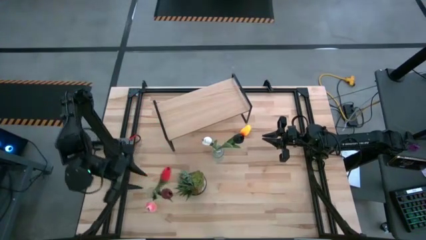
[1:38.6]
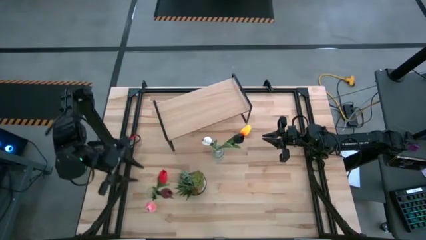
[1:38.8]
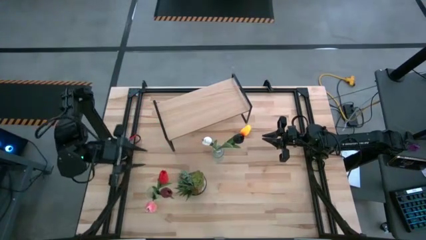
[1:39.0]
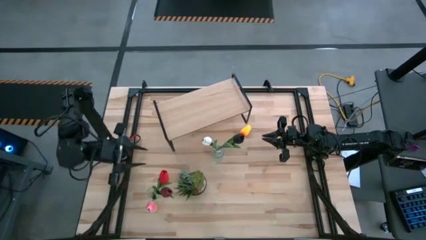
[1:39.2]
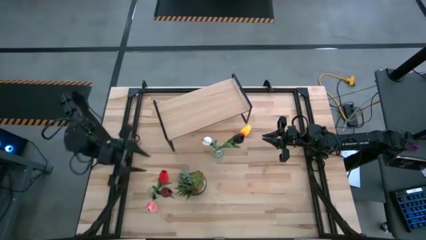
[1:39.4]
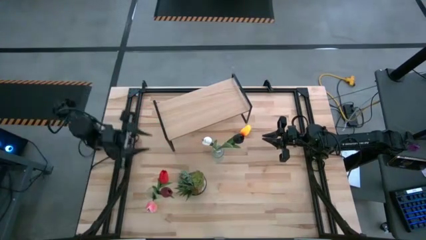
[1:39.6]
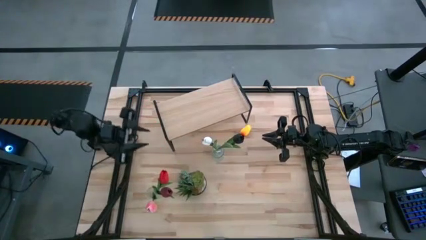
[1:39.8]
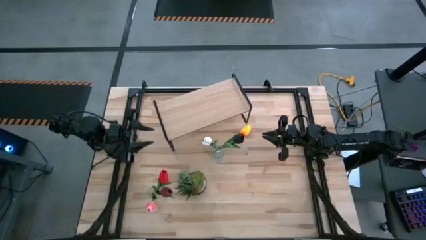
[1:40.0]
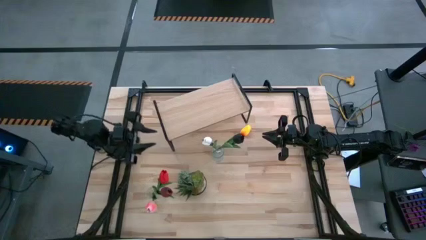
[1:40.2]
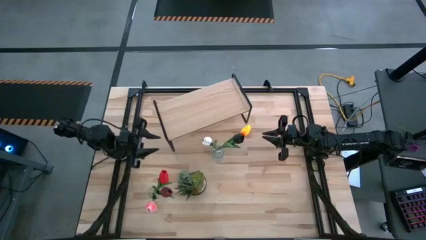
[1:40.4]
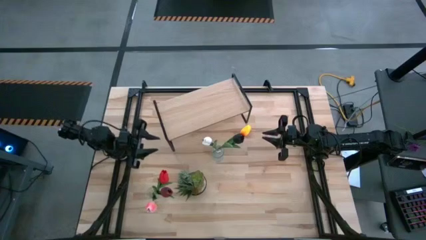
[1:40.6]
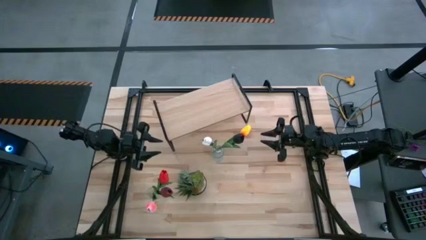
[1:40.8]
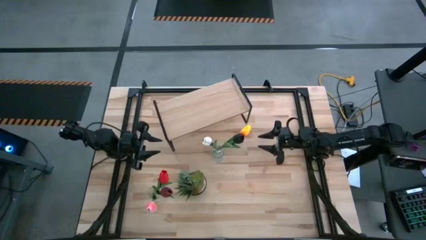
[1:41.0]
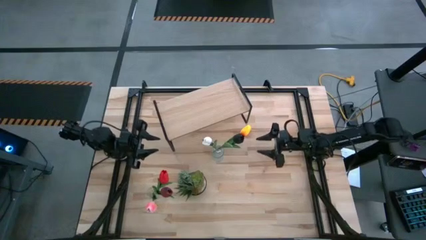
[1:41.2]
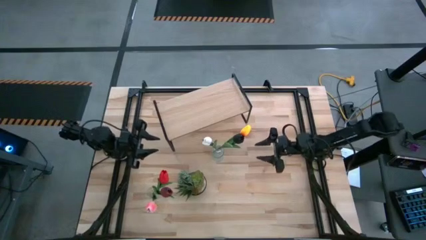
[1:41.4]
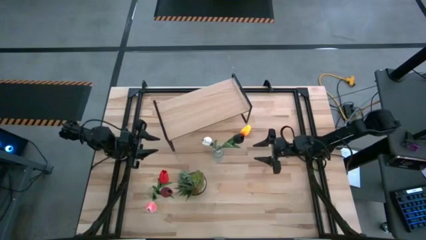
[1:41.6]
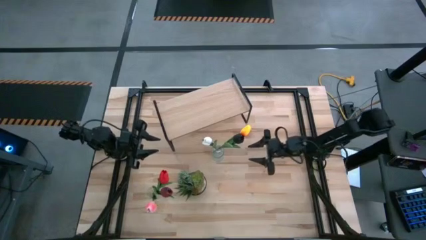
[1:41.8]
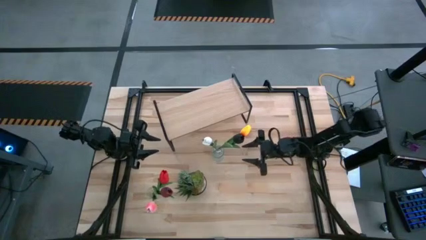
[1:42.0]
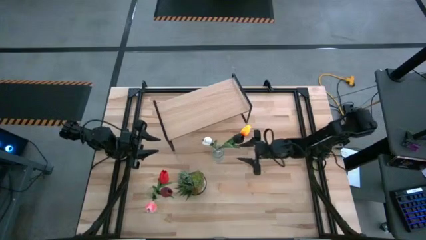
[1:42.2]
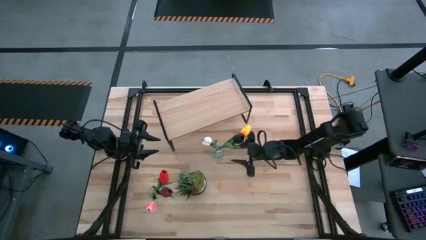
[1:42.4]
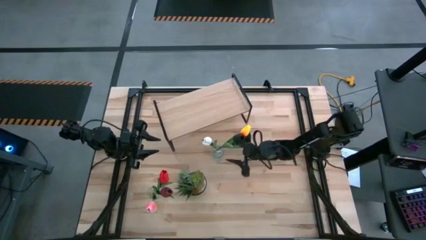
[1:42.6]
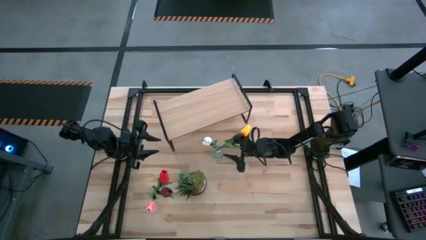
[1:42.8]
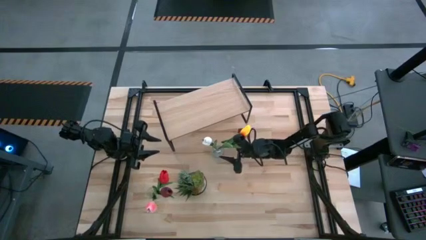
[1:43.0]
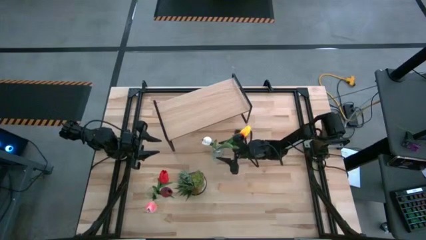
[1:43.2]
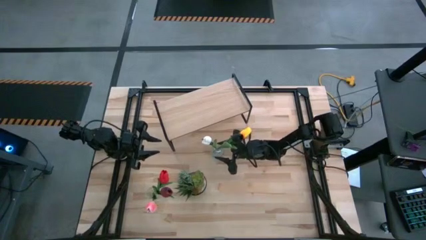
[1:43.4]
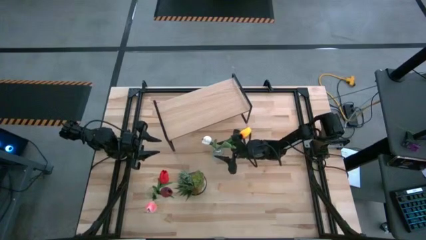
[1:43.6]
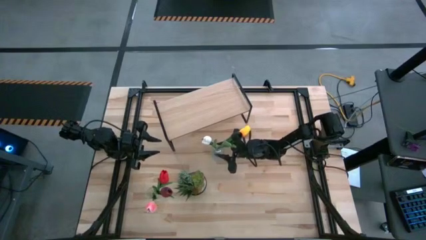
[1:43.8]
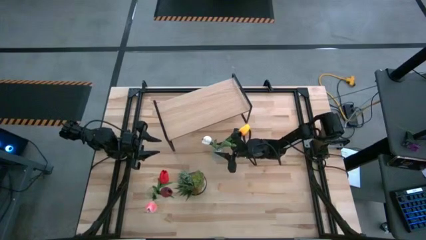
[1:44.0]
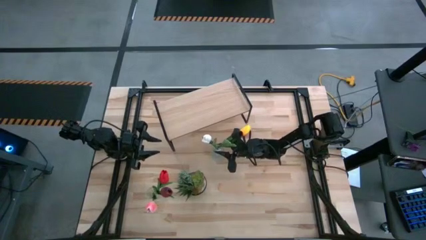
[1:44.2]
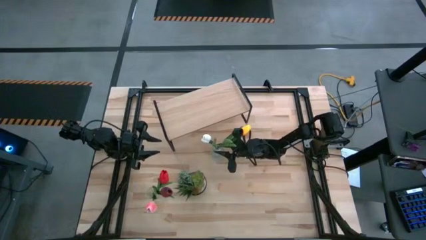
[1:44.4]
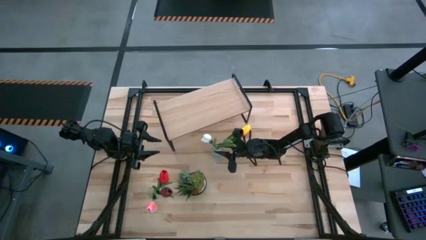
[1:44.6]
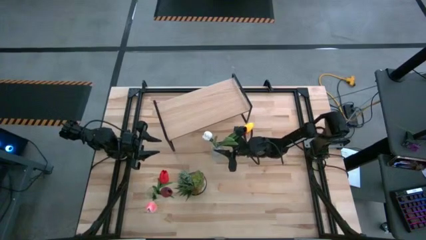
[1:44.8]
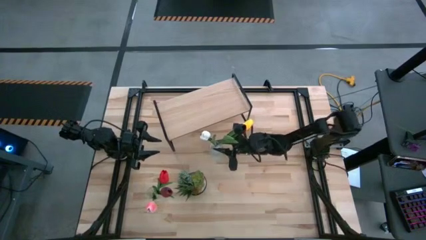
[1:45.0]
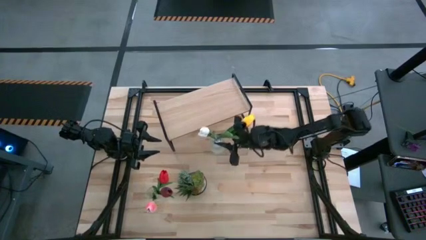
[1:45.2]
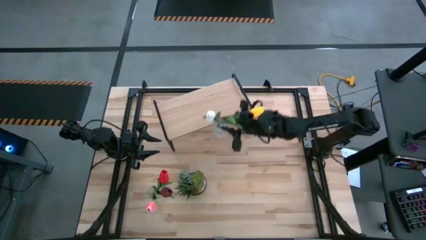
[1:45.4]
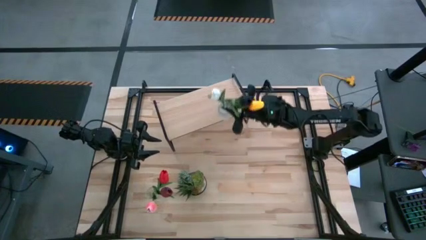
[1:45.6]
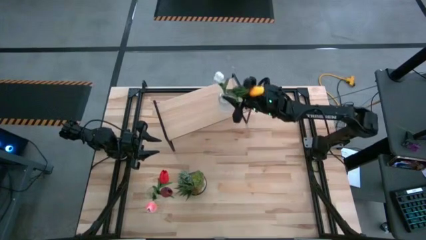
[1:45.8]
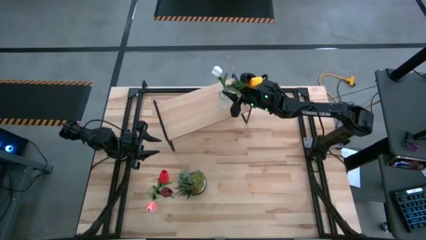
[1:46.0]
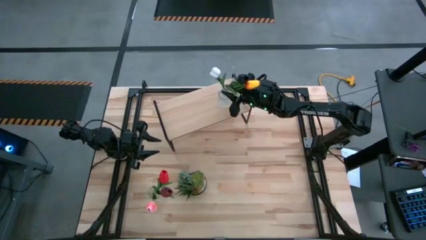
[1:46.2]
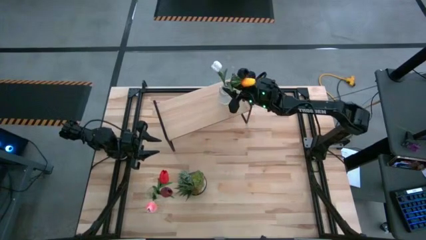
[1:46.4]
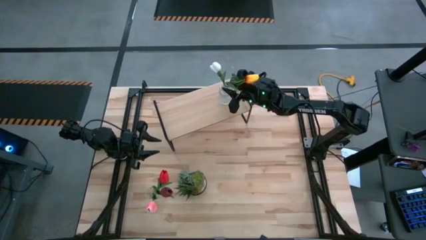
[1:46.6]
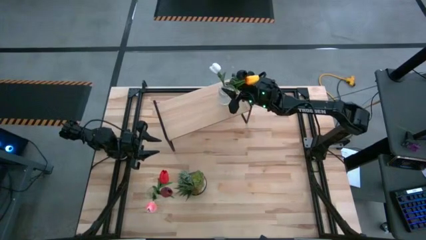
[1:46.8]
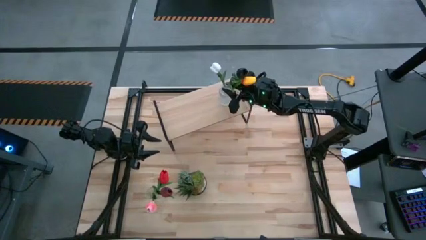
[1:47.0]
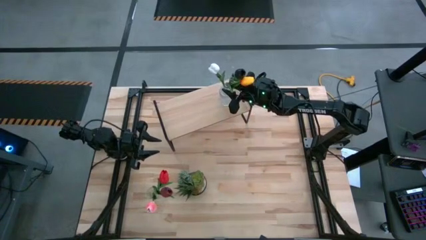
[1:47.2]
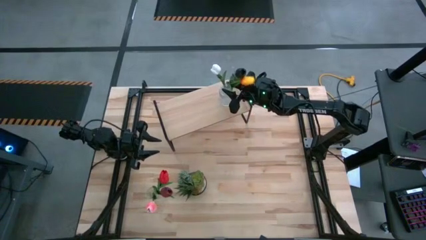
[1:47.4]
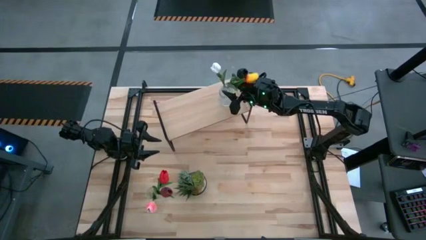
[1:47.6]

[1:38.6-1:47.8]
Task: Pick and place flowers into a vace then onto a shelf
Put the top transparent vase on the shelf
